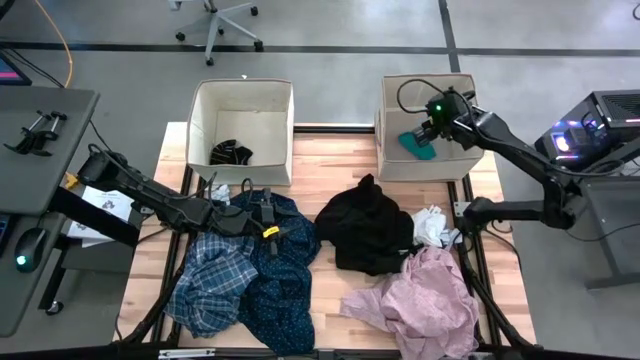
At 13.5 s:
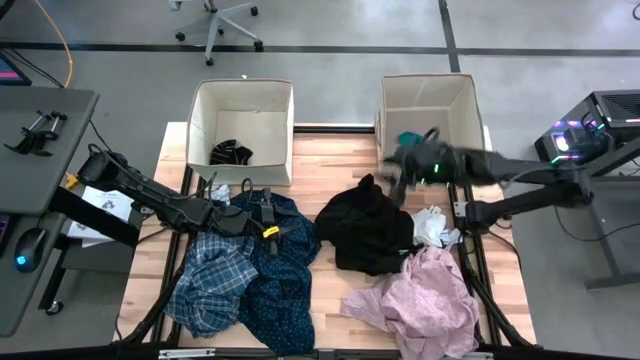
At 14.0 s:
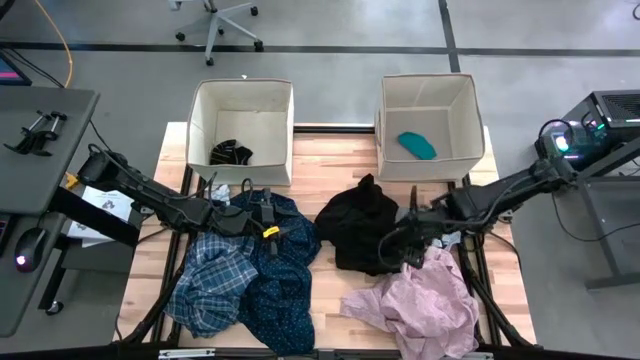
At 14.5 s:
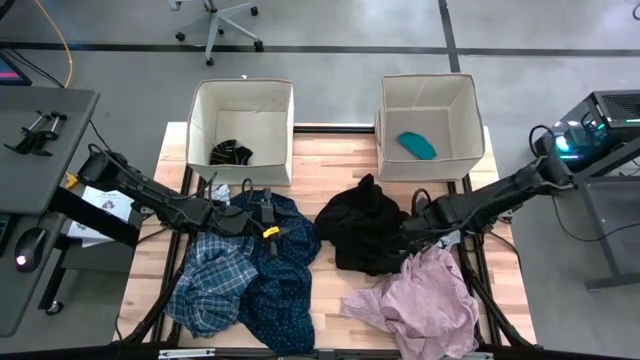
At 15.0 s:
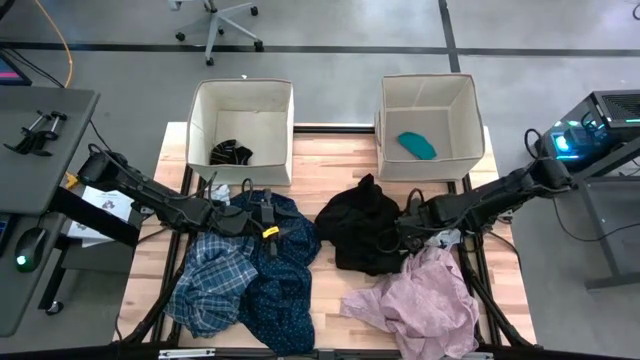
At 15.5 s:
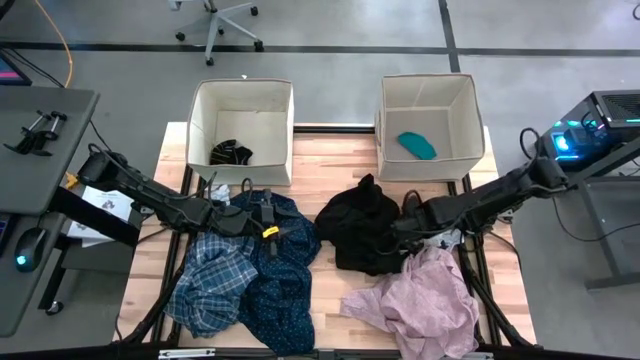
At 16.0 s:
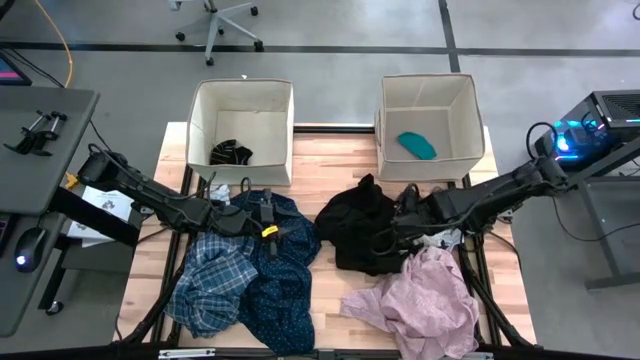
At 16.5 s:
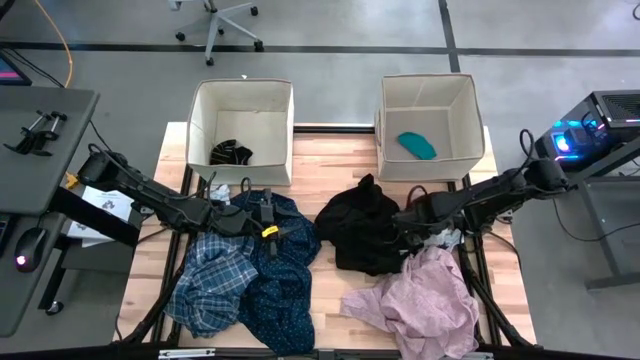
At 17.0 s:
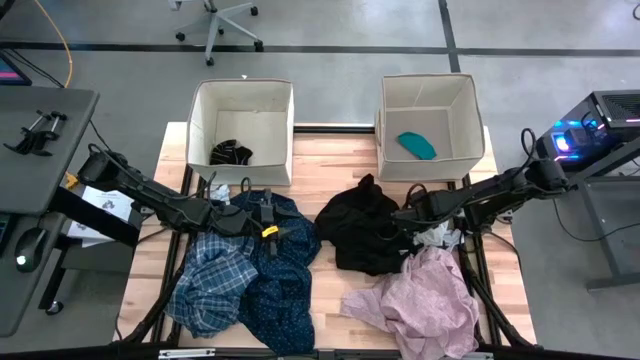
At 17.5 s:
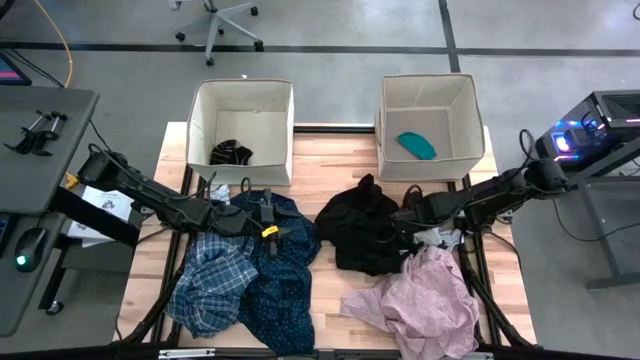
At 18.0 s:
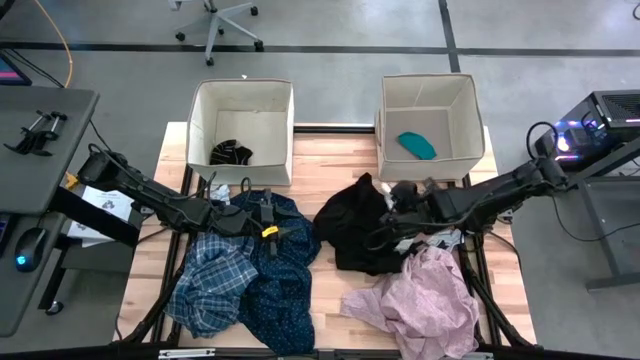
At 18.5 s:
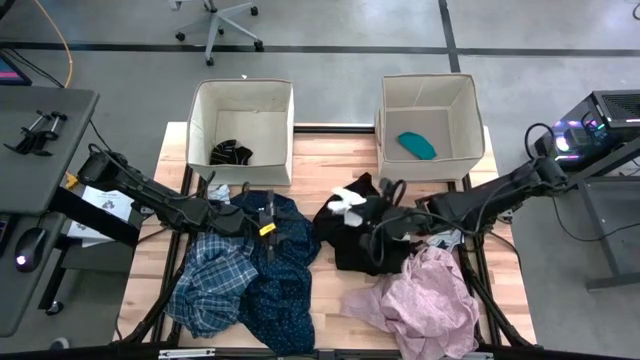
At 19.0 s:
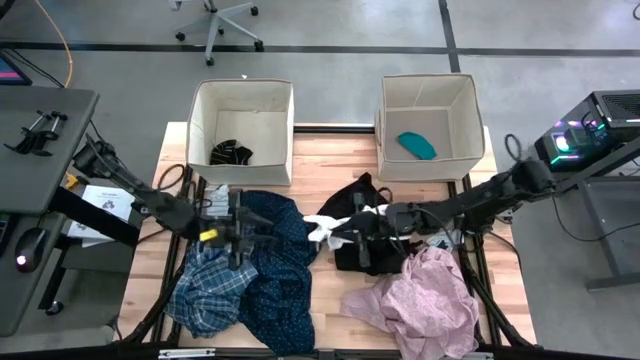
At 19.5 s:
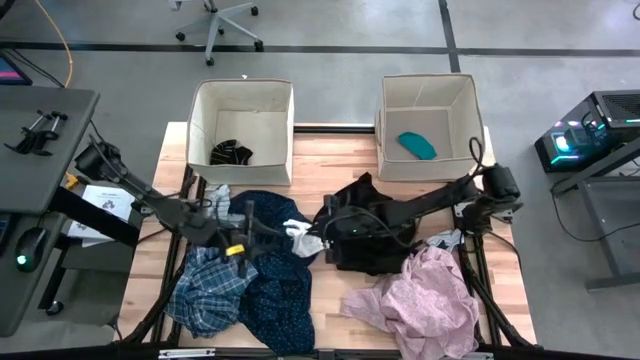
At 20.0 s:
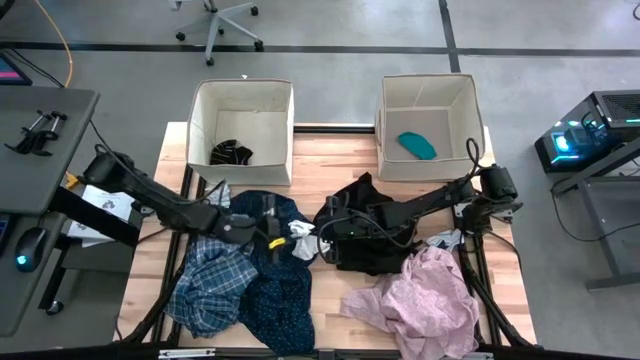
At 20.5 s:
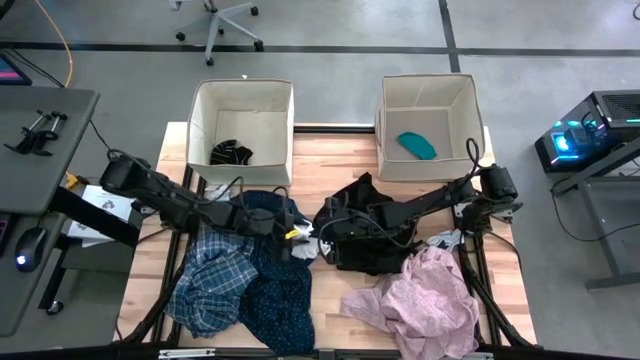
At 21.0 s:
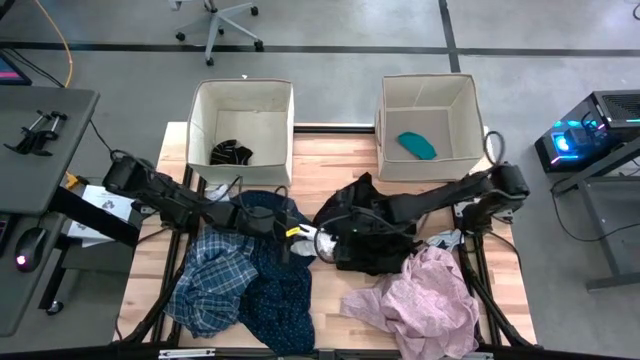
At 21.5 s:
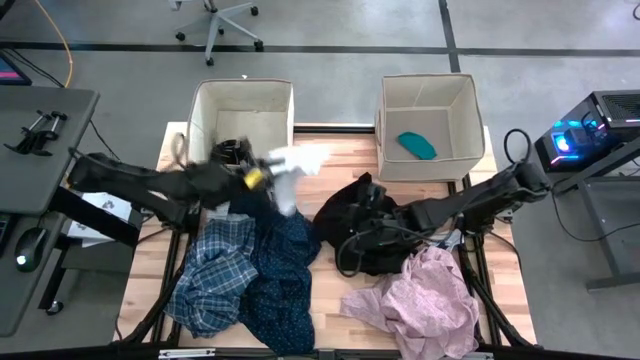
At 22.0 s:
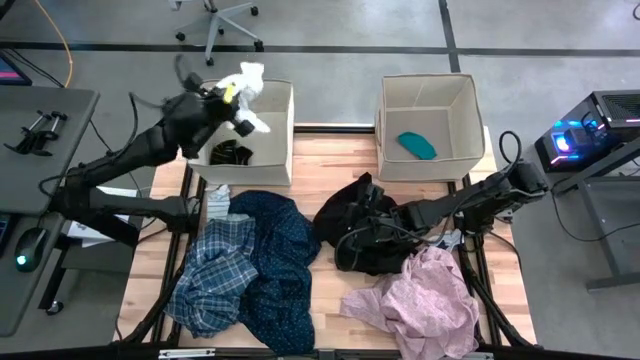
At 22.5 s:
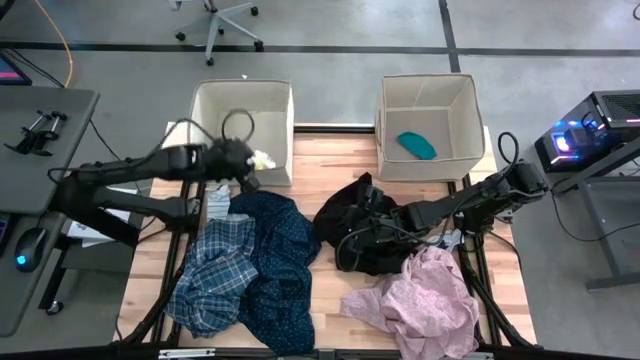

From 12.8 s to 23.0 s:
Task: Sort clothes
Put the top pair of white socks into the right laundry bin

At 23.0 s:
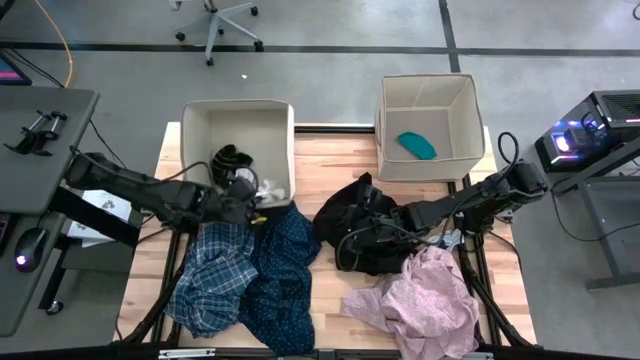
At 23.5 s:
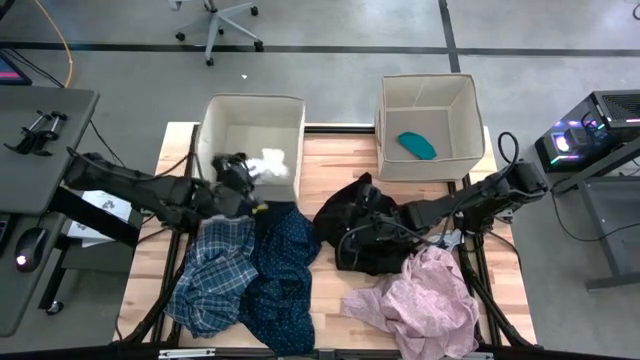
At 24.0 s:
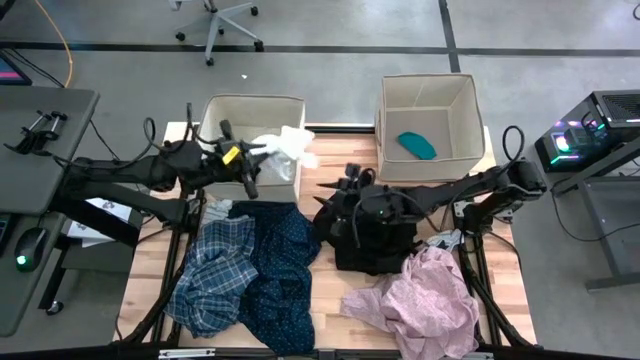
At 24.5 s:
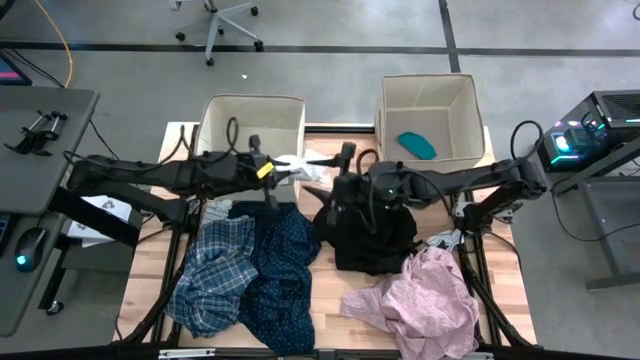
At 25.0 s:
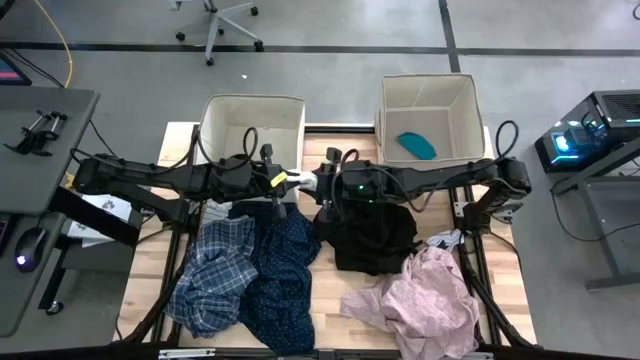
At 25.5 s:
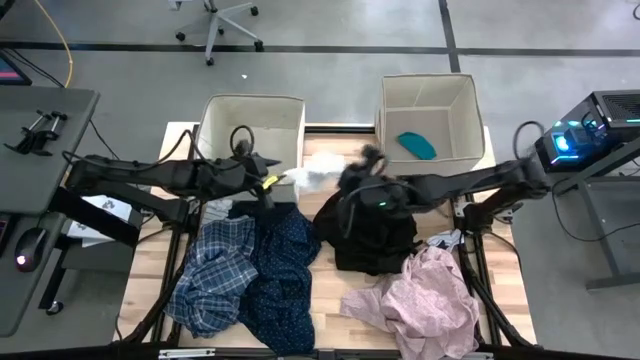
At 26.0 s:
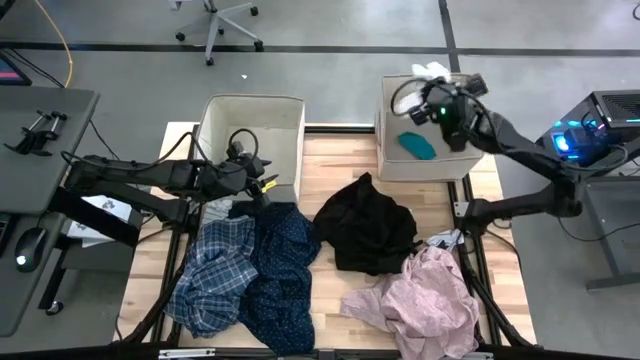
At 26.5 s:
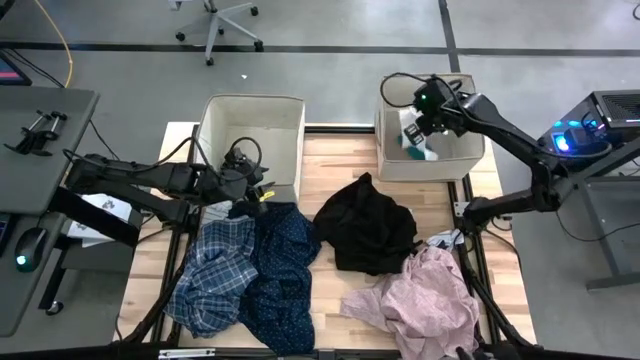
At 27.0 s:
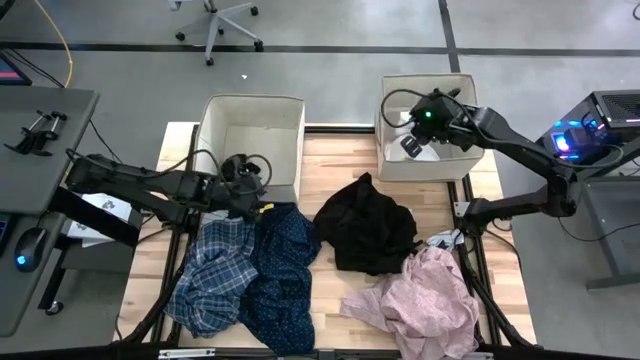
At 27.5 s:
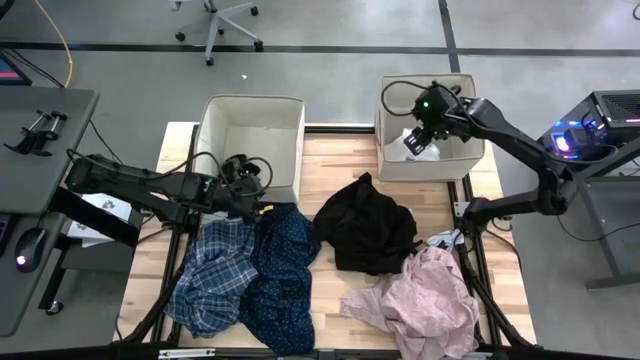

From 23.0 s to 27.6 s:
Put the pair of white socks into the right laundry bin

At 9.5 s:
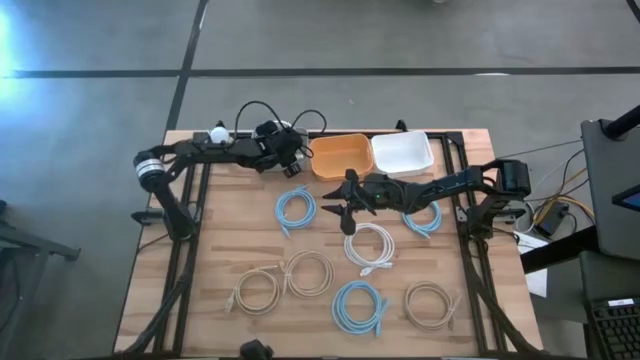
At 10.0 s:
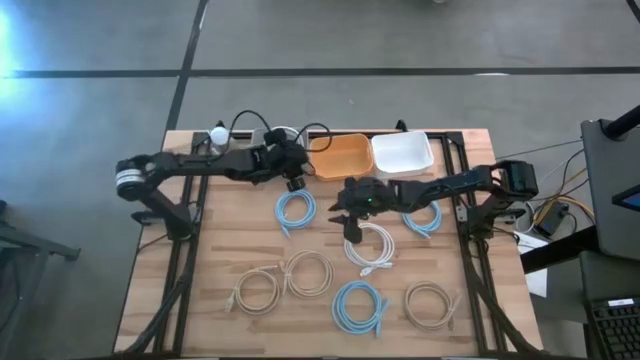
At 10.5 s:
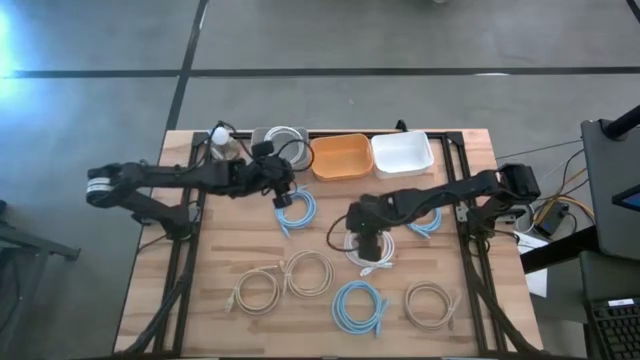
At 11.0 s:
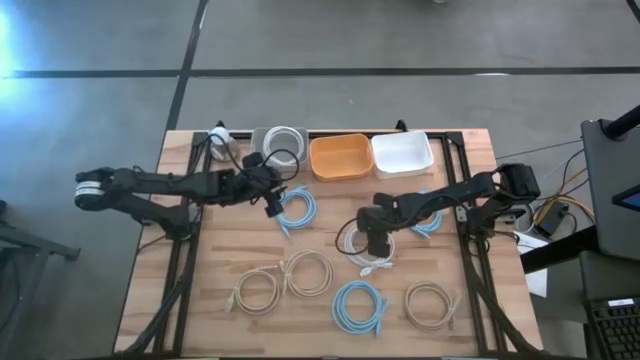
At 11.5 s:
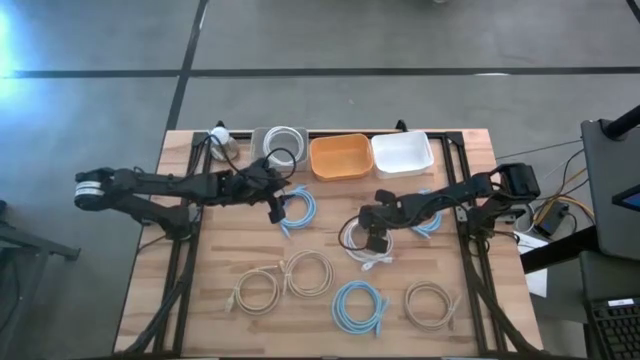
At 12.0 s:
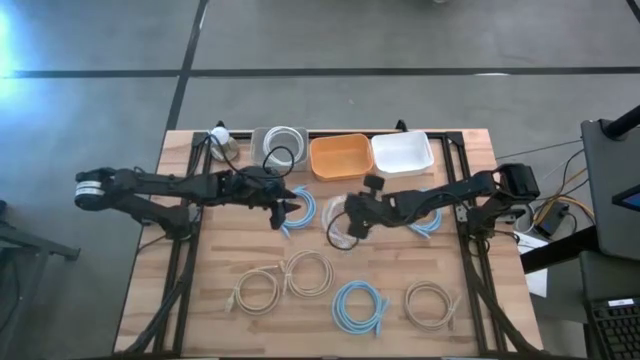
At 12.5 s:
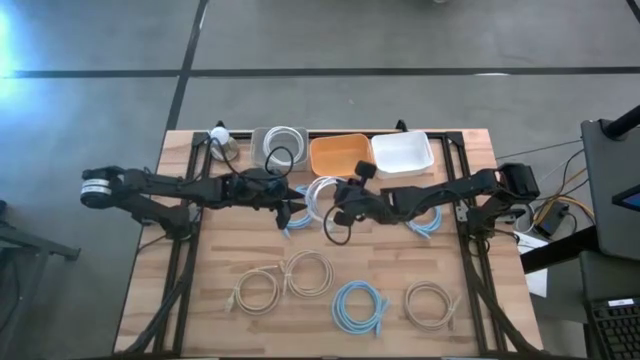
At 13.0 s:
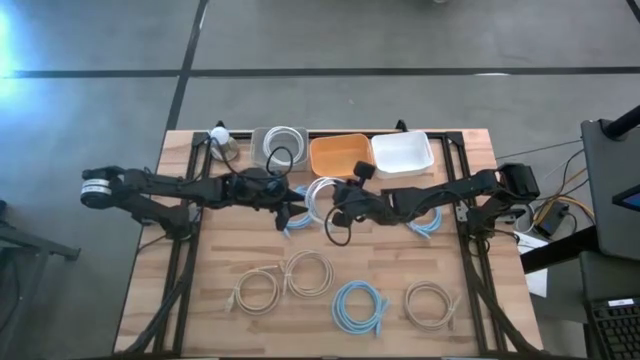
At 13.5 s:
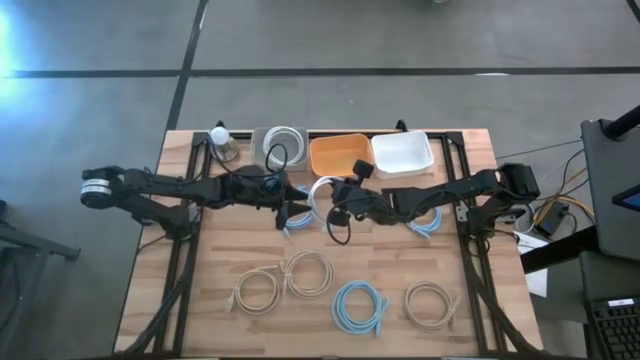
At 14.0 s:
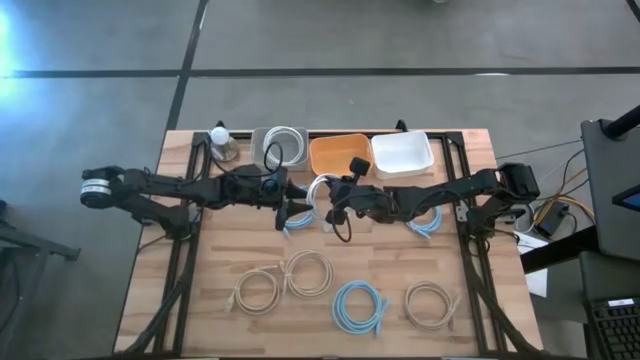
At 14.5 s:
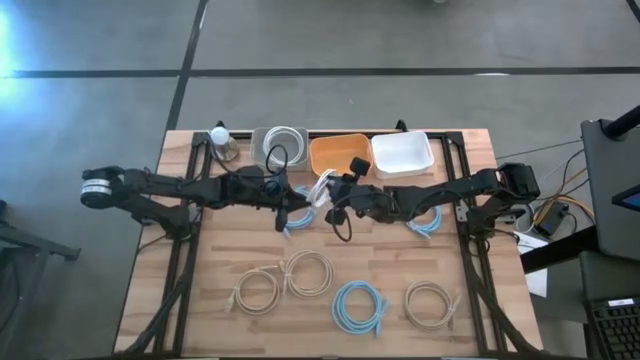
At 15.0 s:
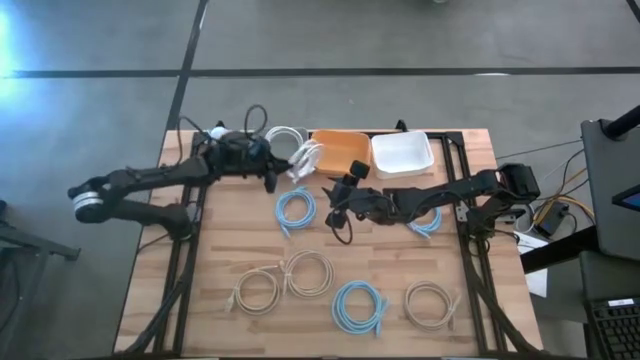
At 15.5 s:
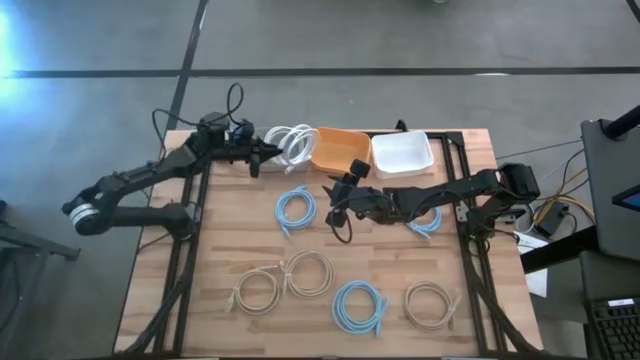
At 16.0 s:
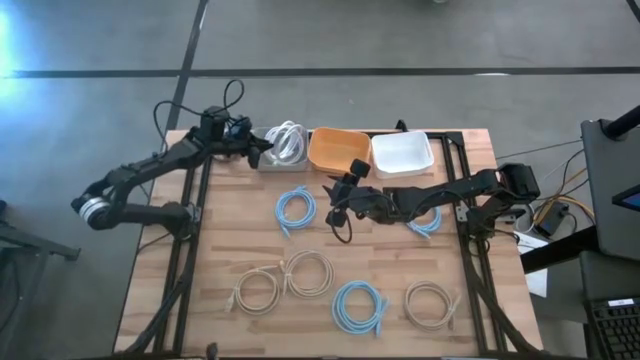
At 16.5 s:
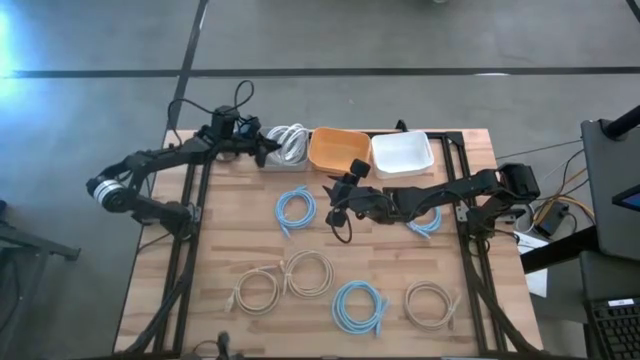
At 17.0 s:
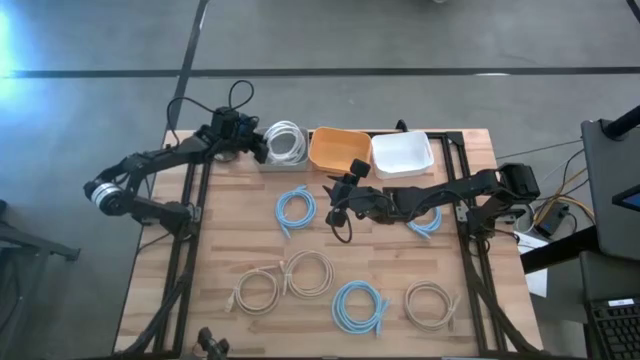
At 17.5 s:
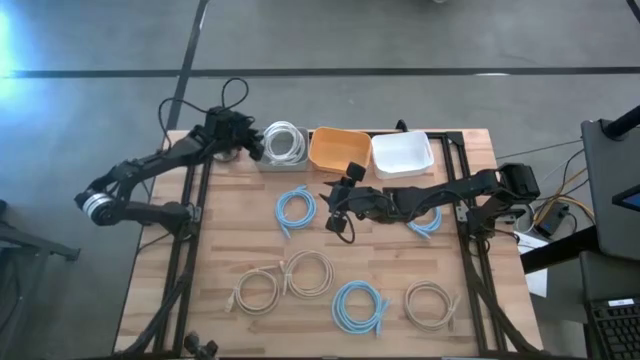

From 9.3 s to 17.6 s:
Task: Pick & Place USB Port
Put the white charger cable into the gray bin
